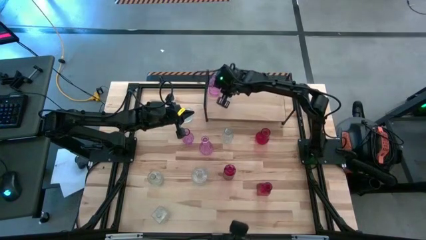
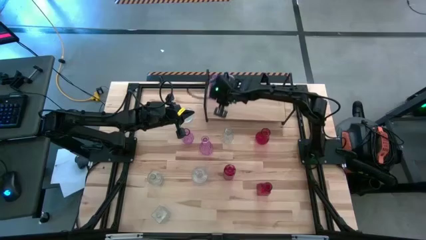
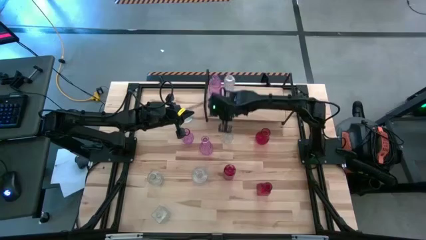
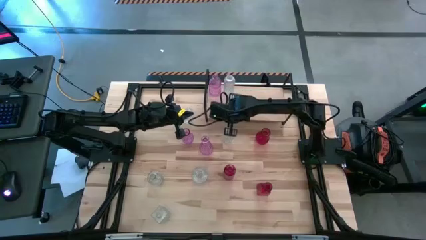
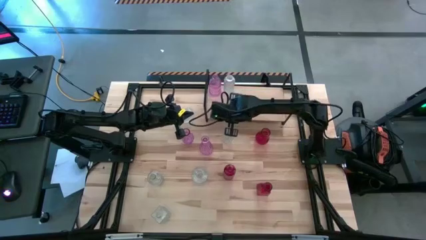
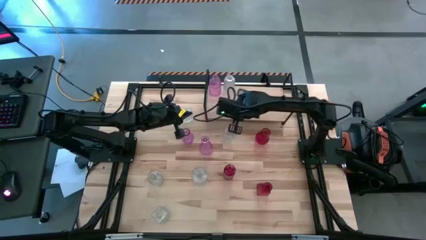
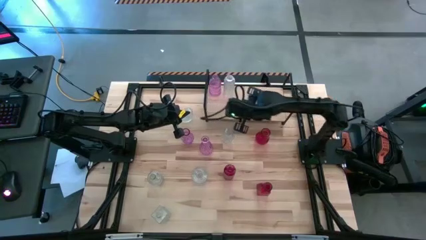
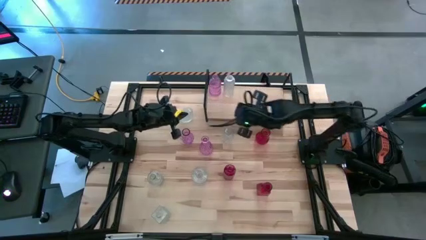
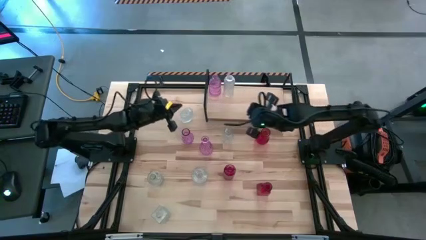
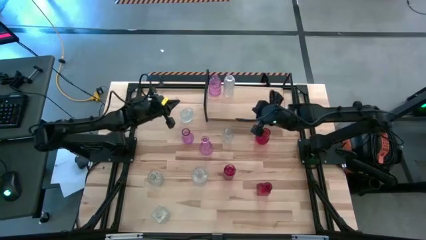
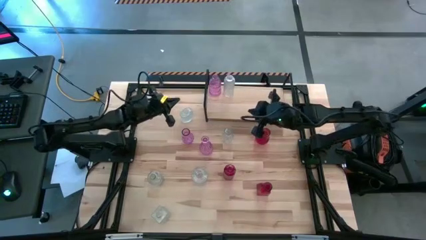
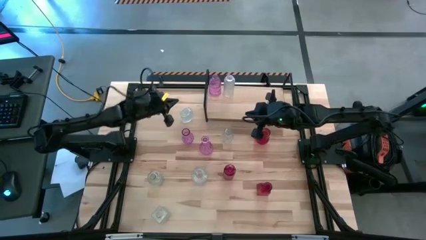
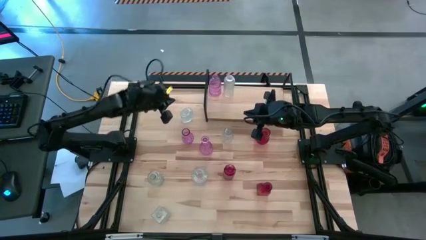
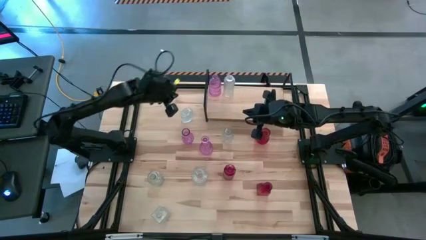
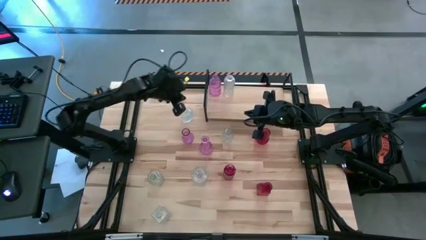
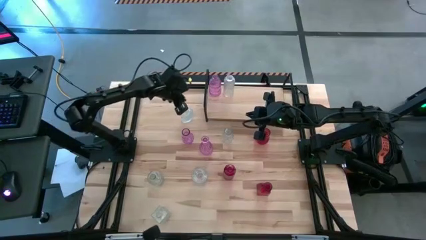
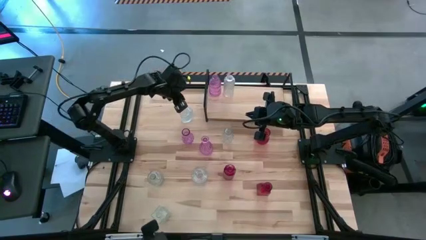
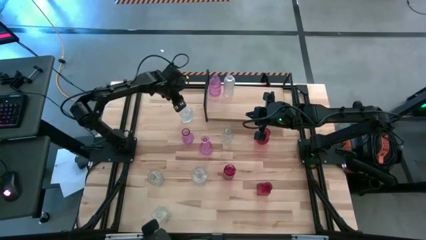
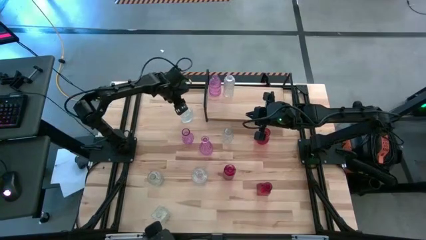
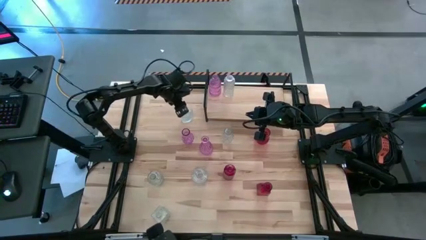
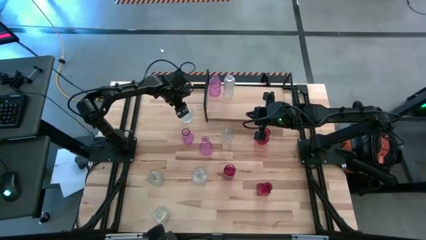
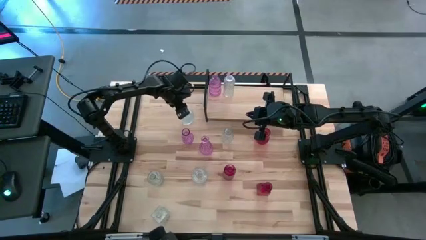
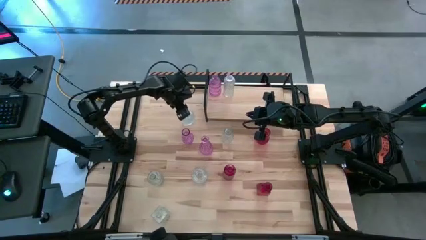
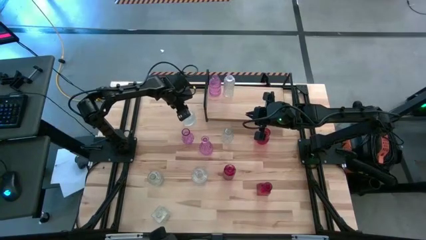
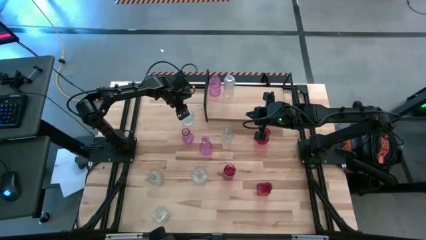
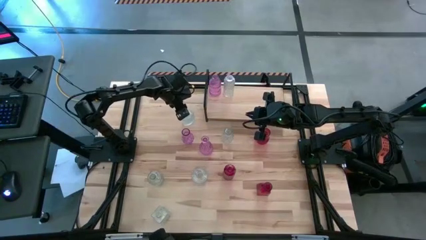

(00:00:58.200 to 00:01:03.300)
Task: sort vases onto shelf
Align the transparent vase with the other transparent vase on the shelf

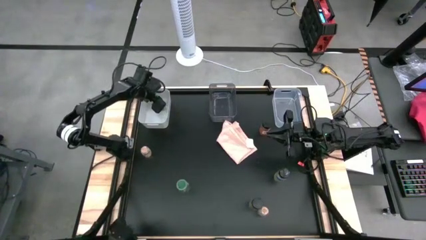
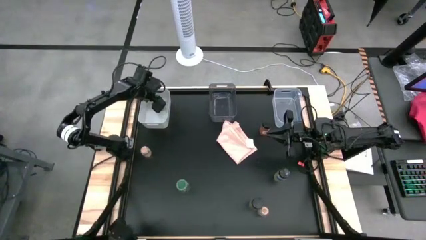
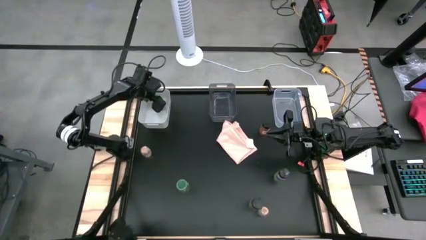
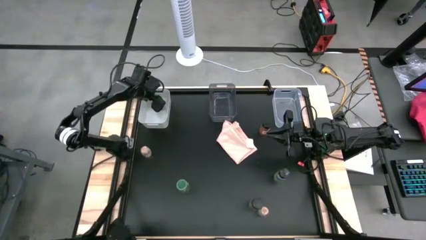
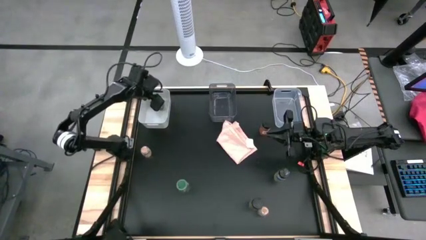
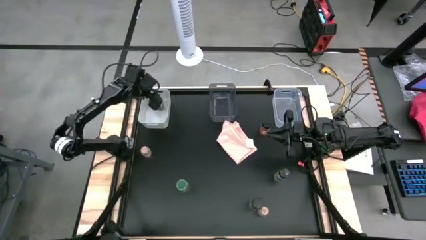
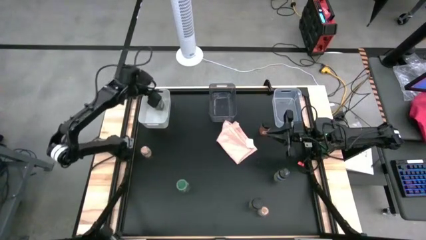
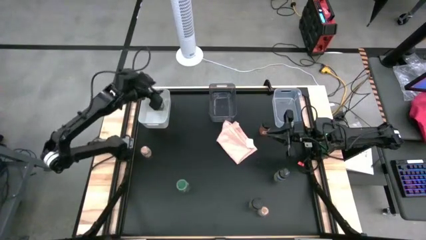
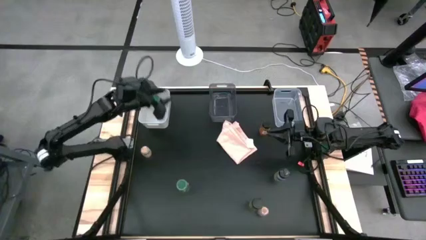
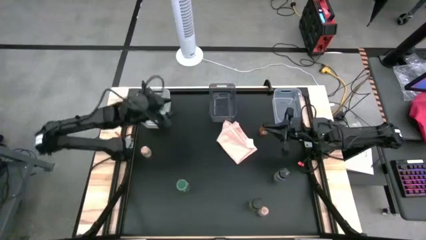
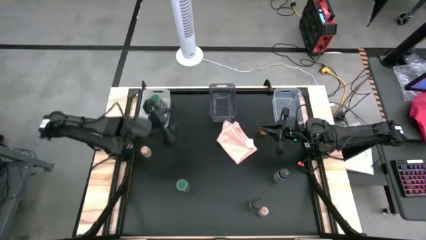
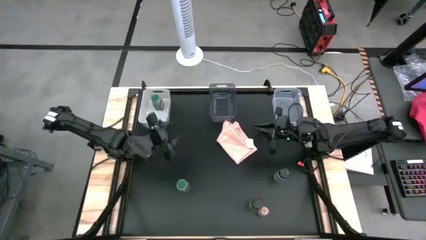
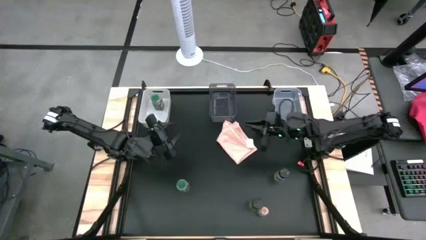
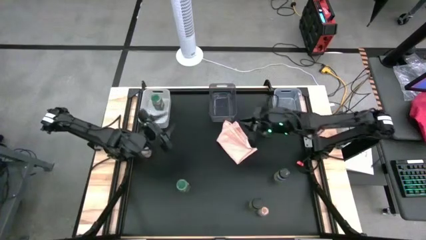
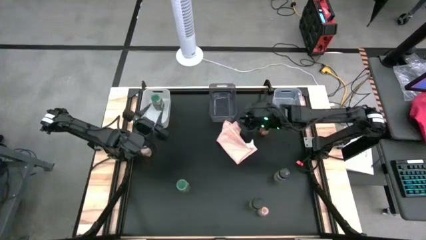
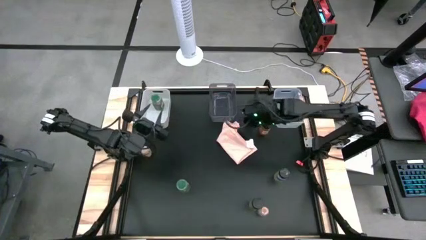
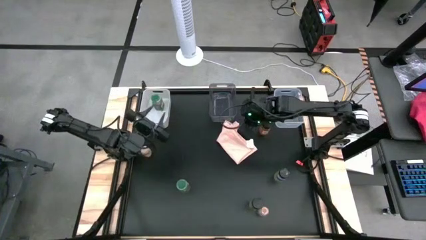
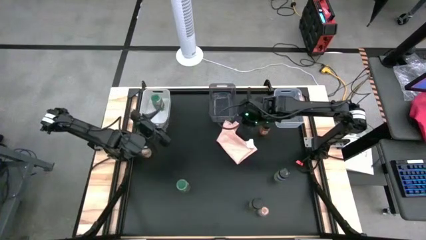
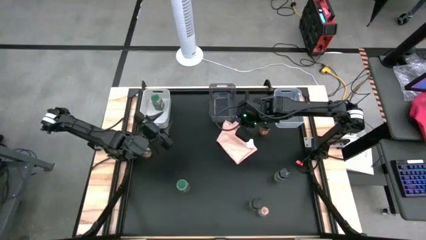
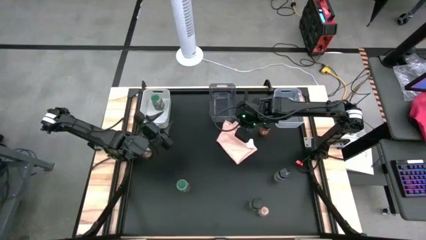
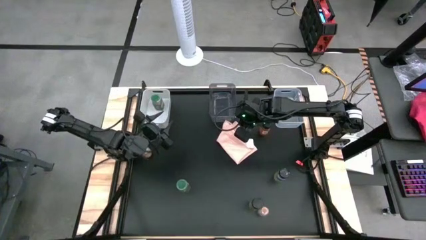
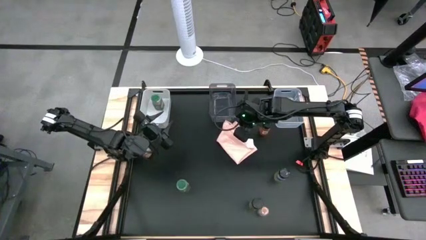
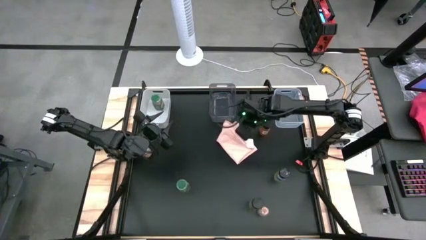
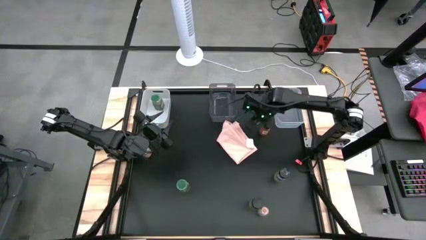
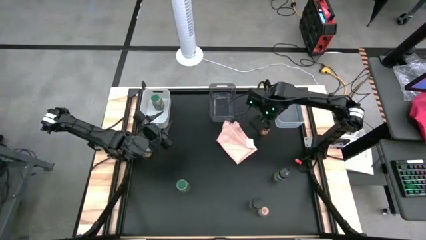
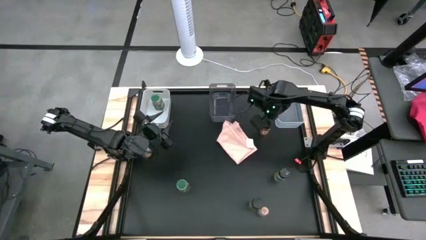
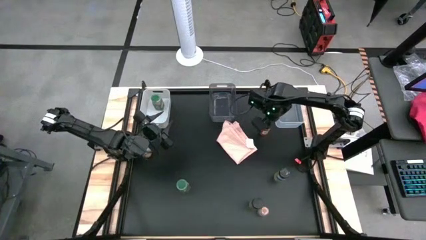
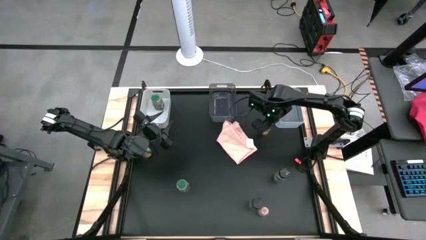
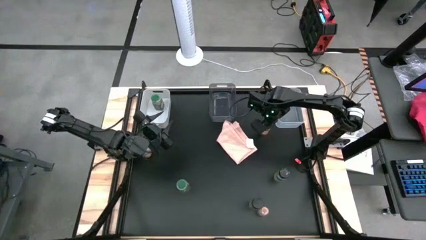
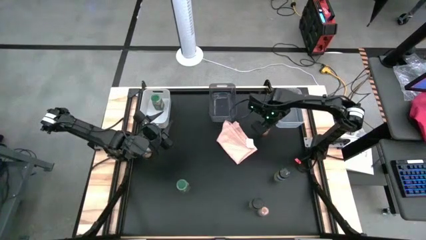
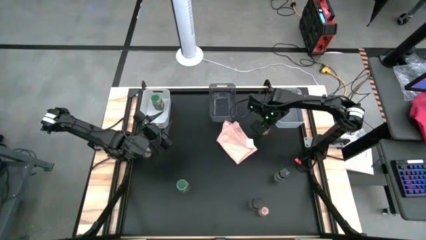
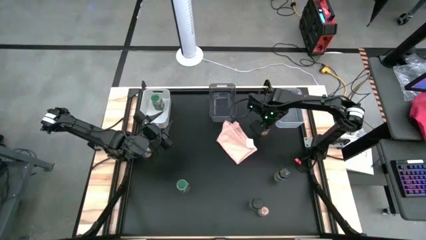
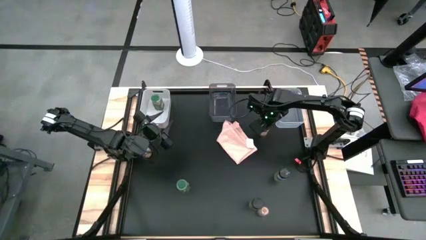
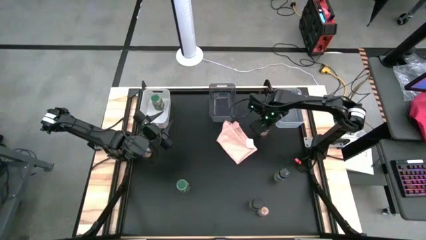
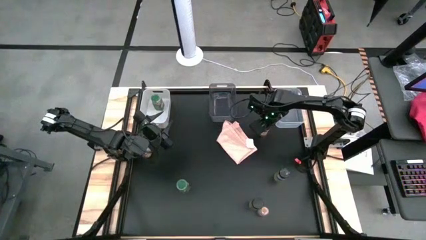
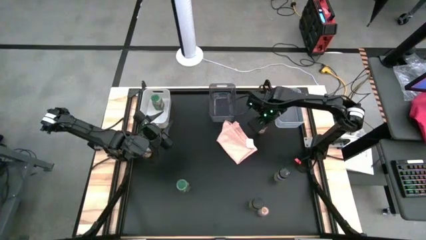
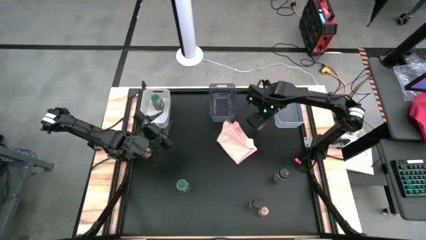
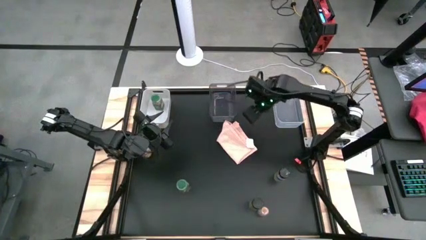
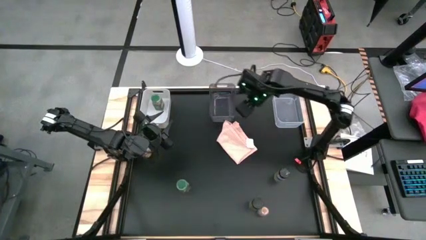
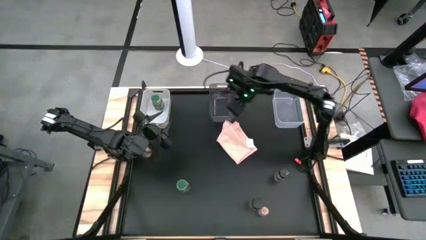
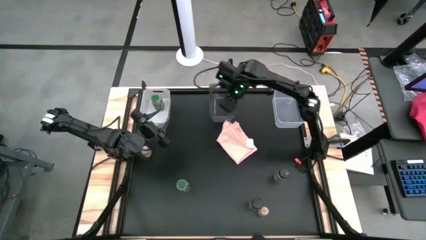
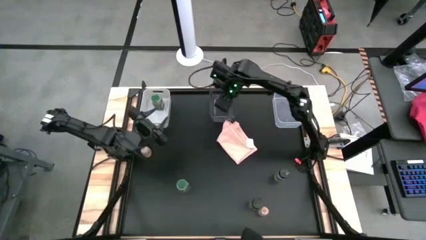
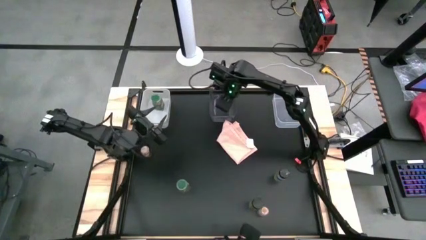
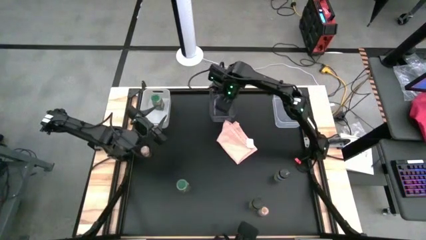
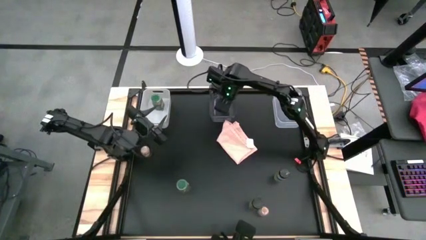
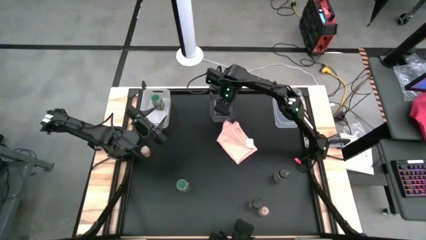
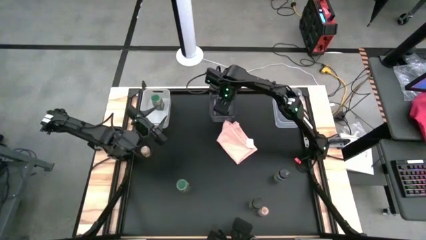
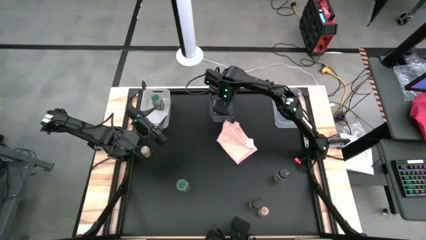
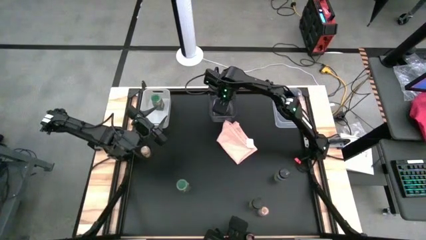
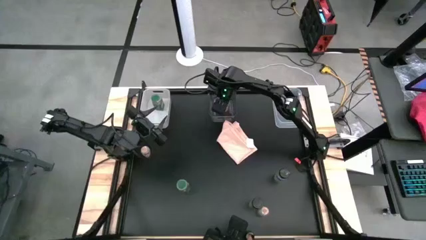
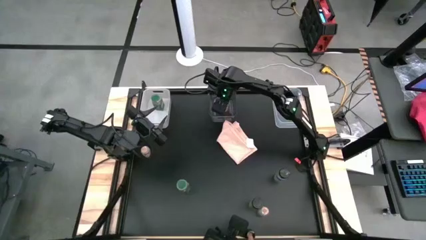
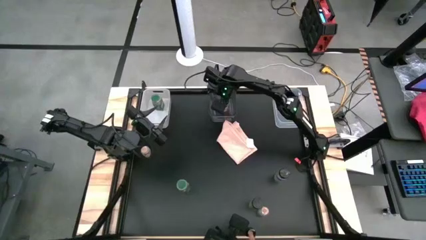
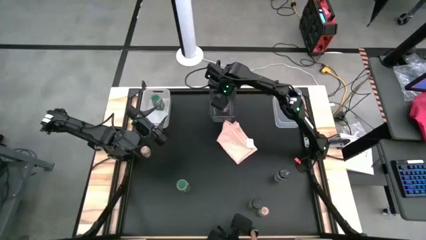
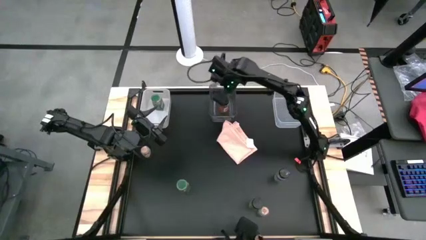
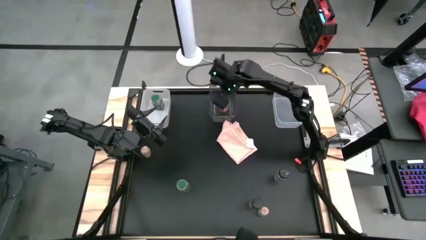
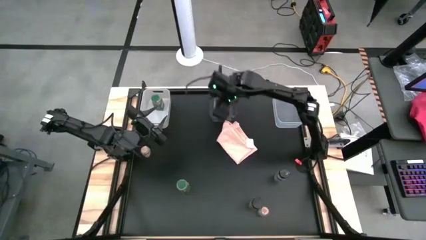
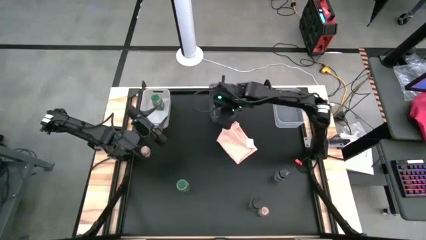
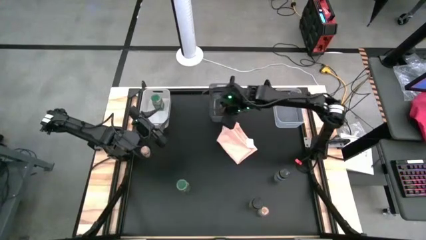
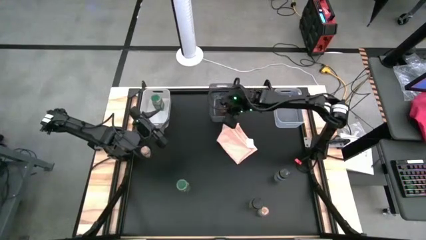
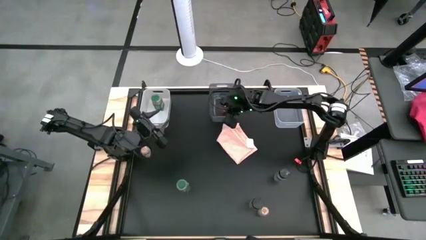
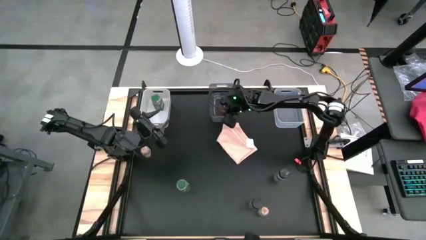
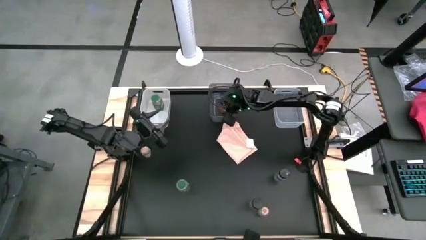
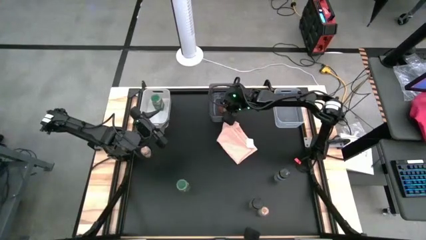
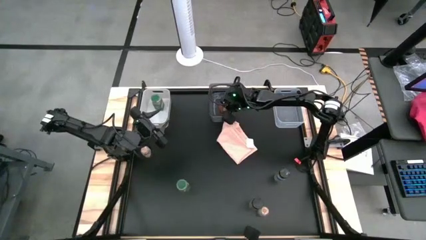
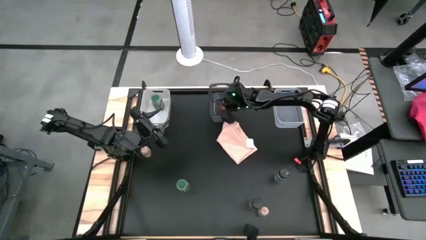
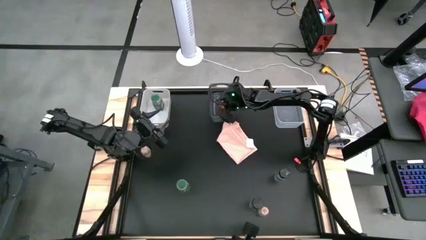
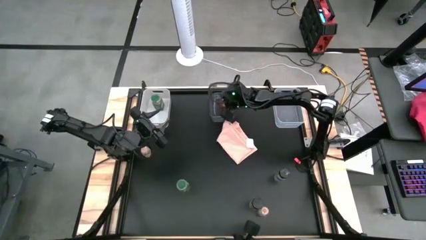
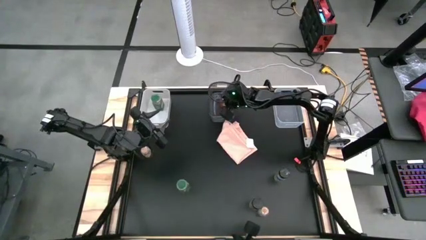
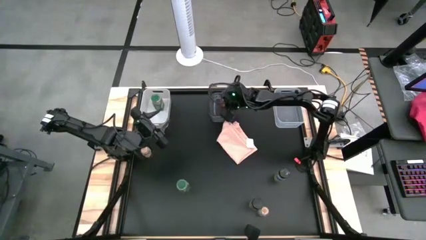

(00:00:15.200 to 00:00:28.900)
Task: Sort spices by type
Put the top right black seasoning bottle into the black bin
